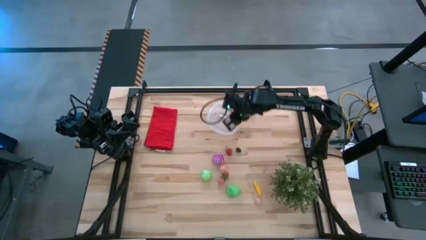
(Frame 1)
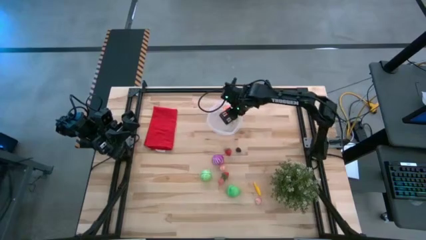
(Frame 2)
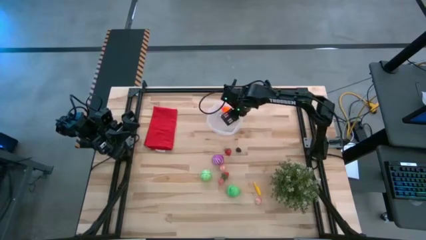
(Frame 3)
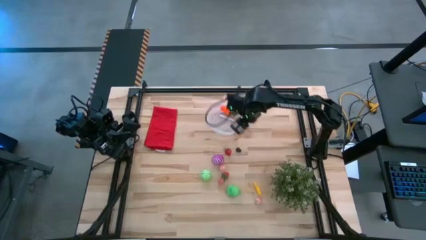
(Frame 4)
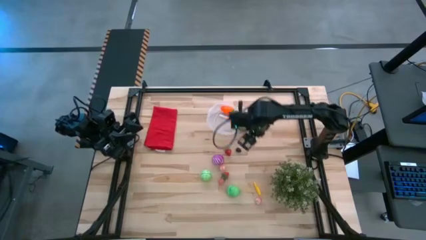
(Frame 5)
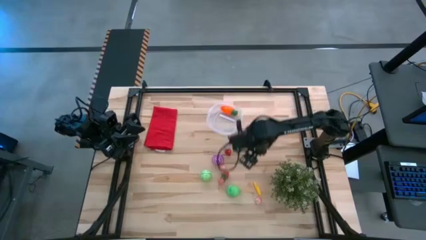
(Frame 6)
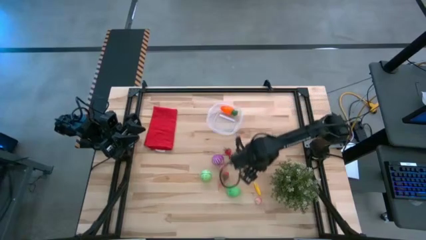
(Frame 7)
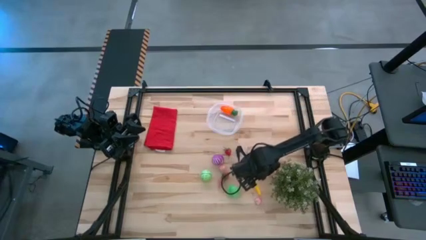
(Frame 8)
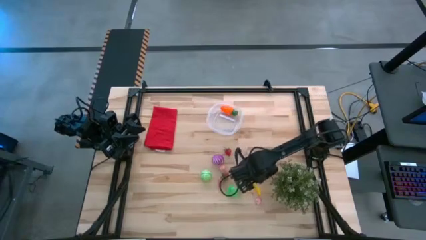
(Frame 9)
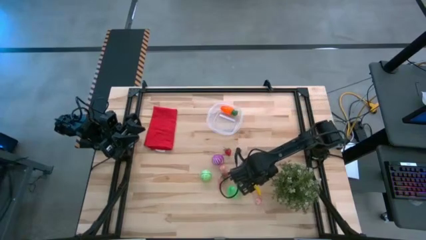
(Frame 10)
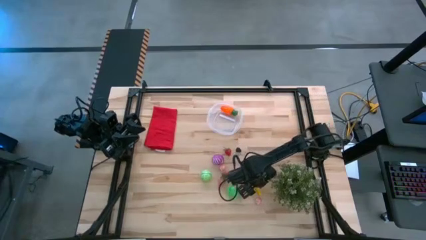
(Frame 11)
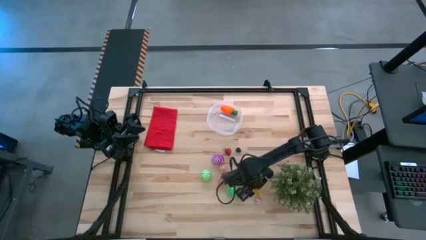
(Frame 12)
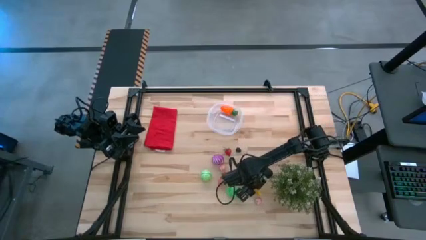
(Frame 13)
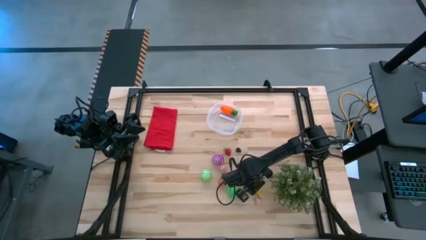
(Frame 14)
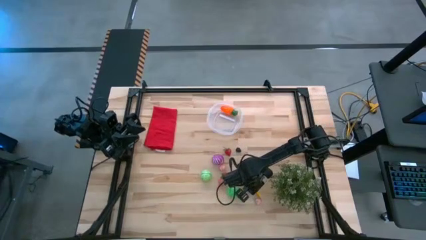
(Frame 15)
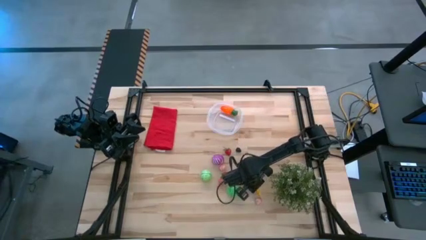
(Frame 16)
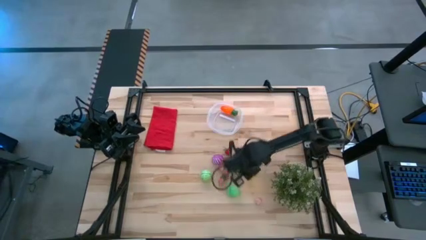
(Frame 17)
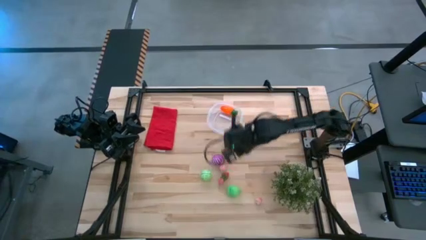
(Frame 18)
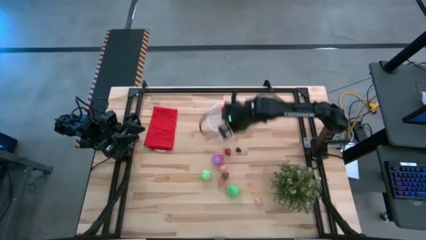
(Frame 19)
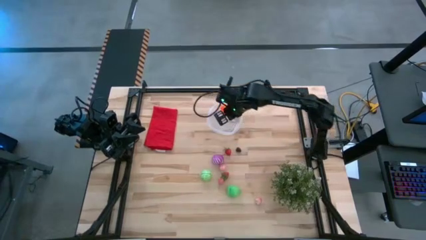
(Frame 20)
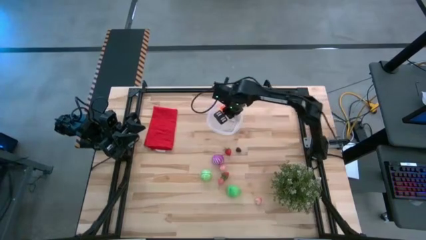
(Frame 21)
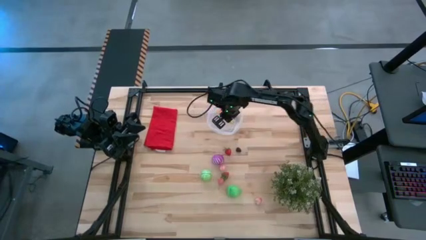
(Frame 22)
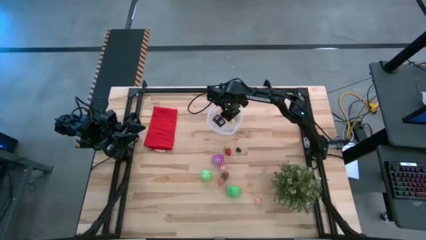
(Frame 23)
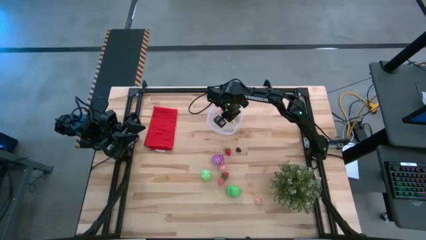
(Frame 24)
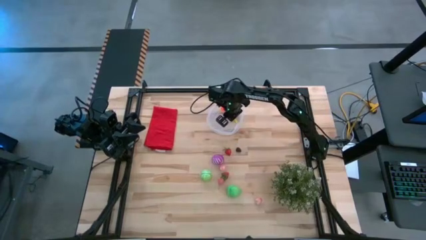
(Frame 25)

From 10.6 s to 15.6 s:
Task: Pick and placing Produce into tupperware
Put the yellow corn into the transparent bin

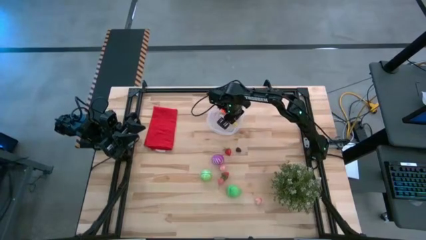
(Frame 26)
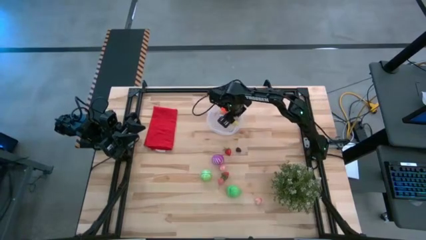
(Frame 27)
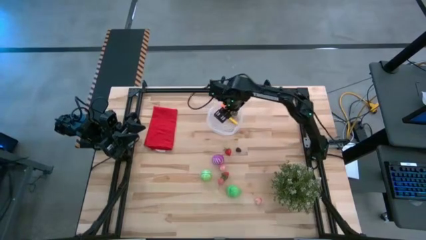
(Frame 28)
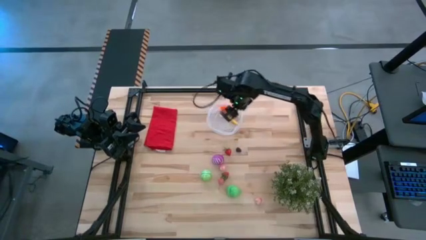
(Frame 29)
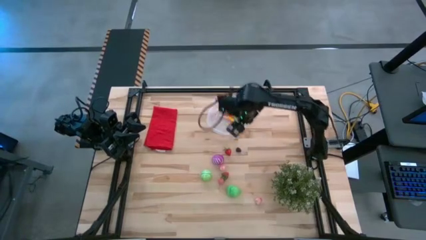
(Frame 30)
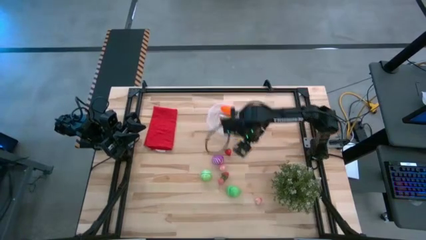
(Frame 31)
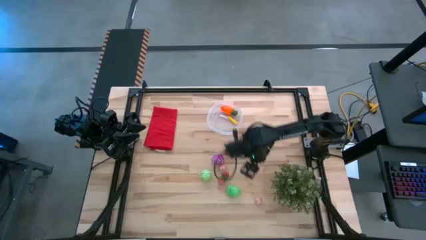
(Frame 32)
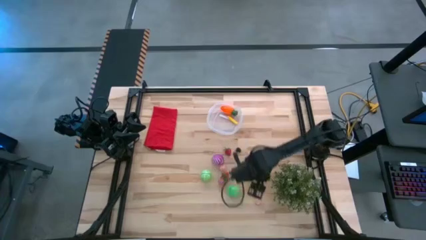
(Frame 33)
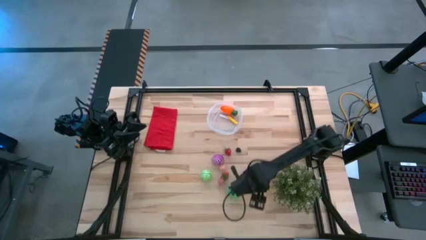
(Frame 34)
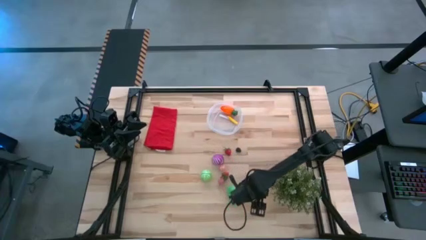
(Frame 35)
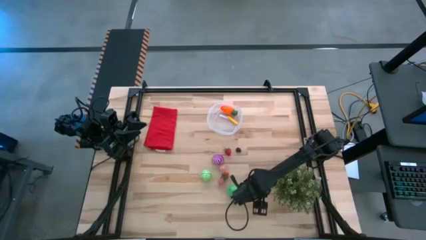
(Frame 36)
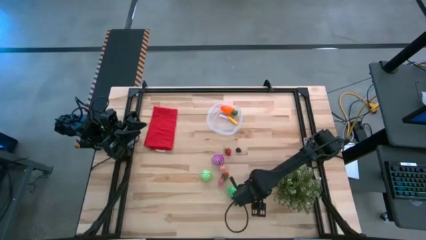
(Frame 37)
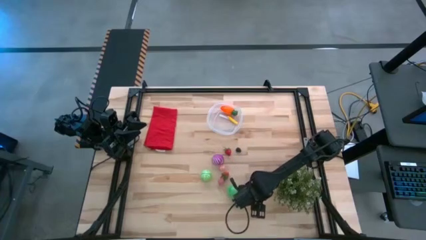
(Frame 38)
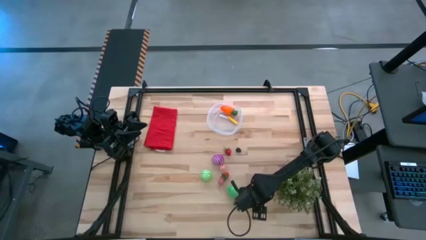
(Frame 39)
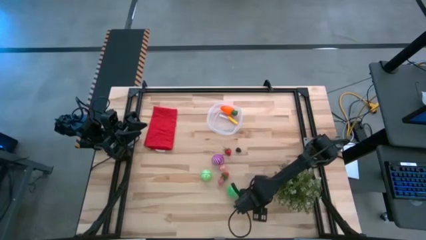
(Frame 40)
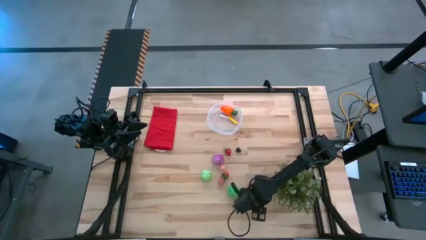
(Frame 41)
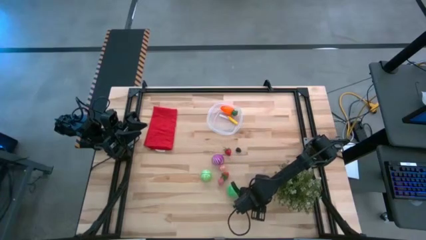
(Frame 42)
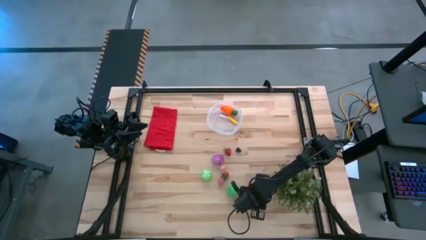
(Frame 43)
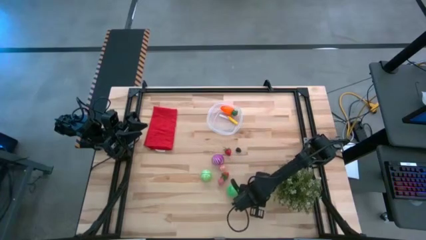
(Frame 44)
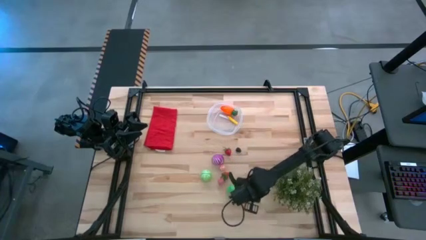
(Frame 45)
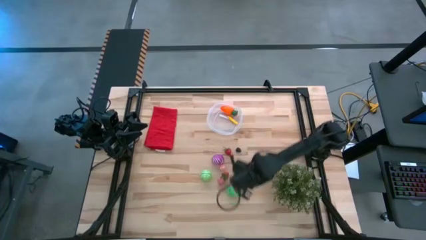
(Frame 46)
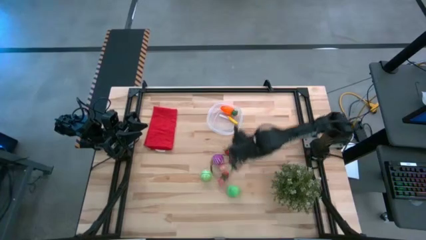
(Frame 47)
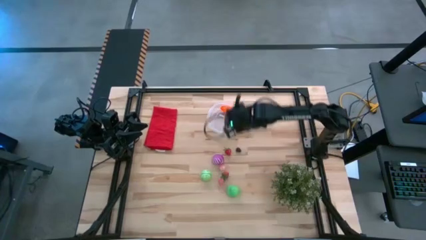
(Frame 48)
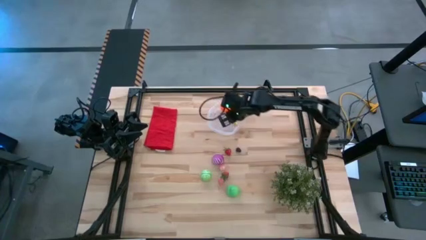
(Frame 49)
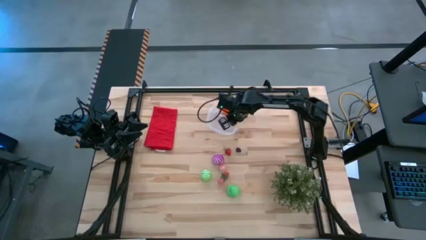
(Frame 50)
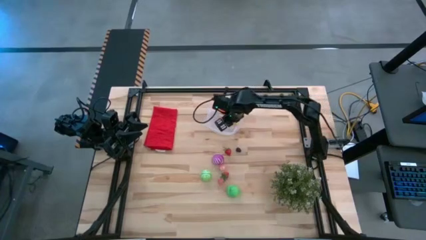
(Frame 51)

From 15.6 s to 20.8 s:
Put the bottom pink peach into the transparent bin

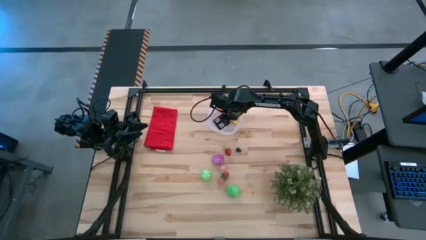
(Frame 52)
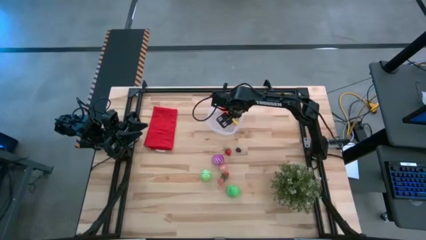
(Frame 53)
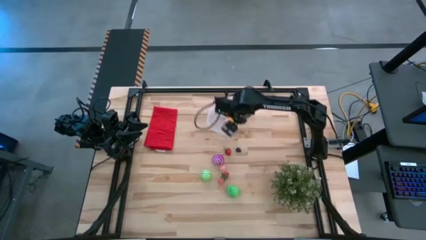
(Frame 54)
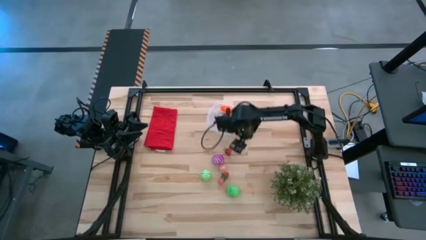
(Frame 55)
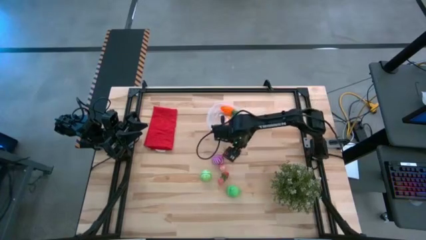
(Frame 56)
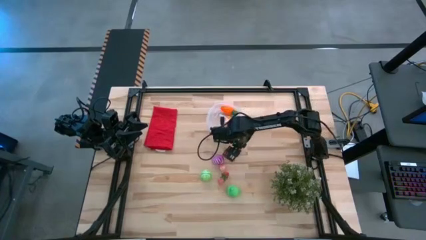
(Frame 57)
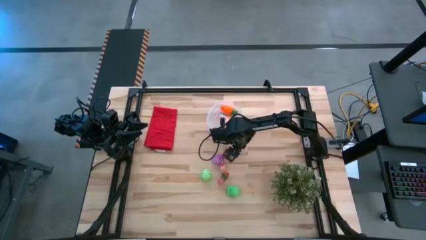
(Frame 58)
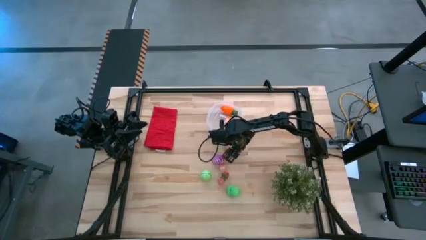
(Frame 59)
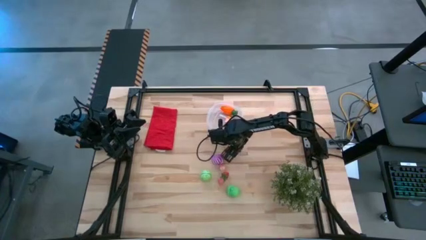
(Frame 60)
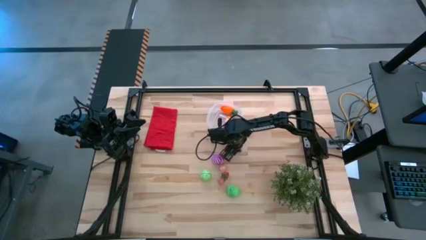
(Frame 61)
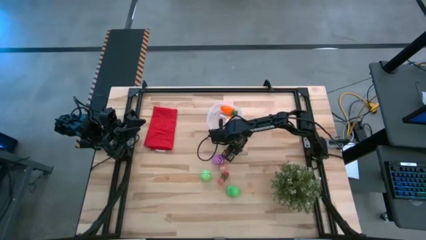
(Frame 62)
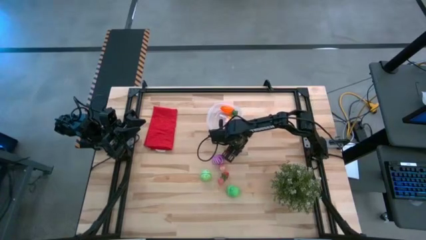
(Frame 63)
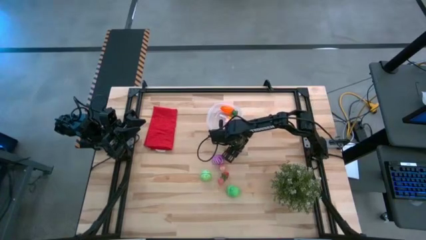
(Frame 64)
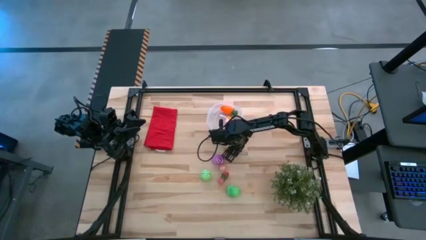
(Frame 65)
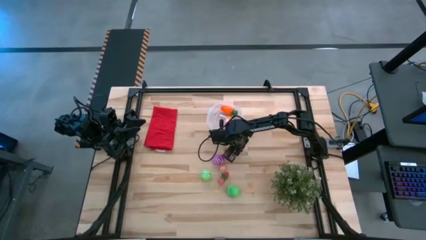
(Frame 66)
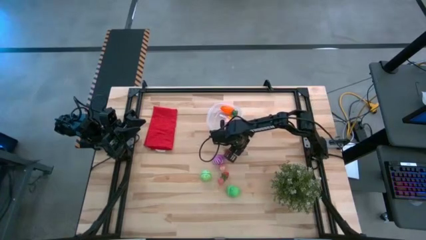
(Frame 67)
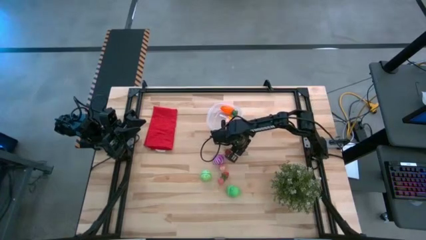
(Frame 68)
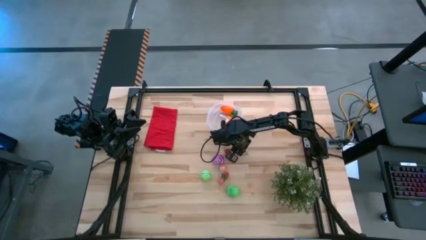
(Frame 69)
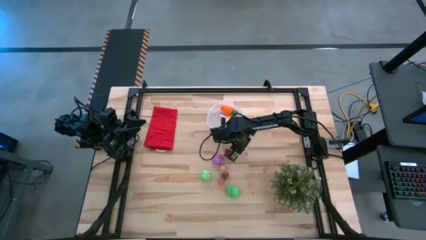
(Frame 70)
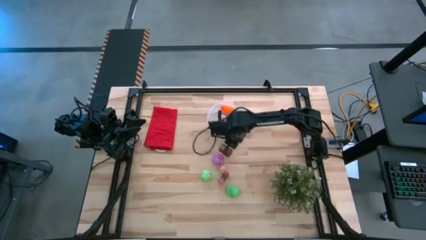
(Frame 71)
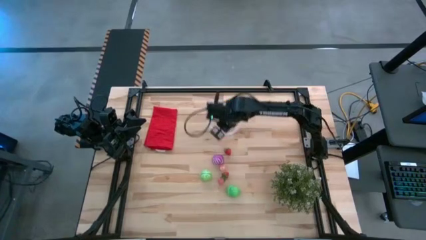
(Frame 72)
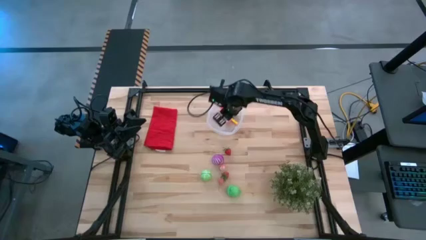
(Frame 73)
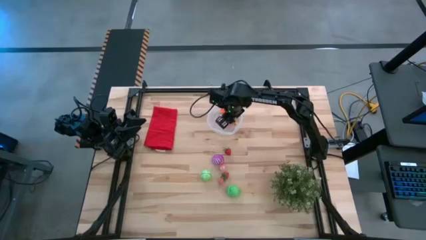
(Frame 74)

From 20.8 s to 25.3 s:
Put the blackberry into the transparent bin

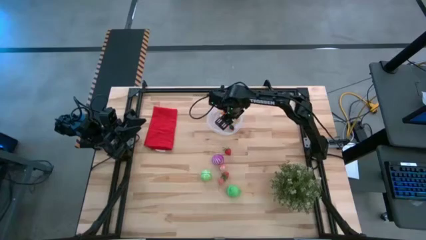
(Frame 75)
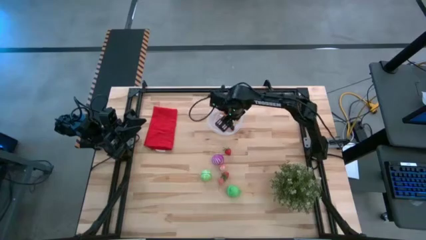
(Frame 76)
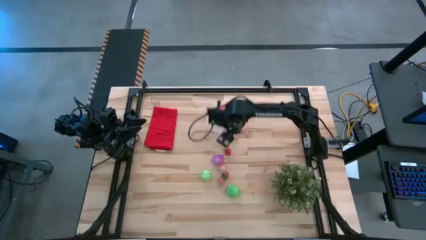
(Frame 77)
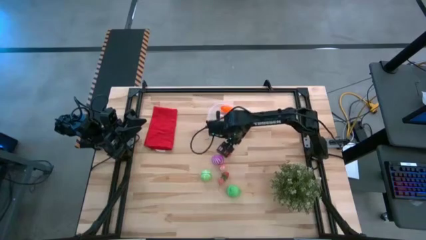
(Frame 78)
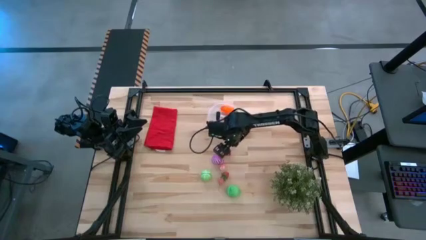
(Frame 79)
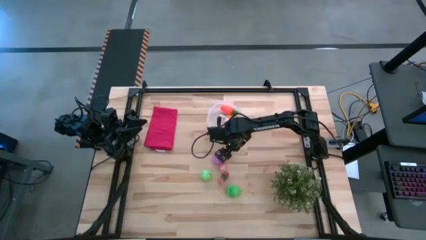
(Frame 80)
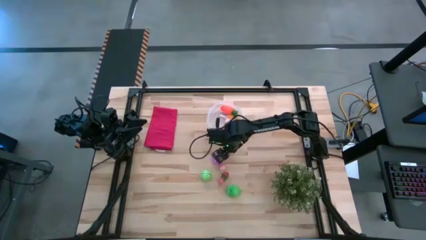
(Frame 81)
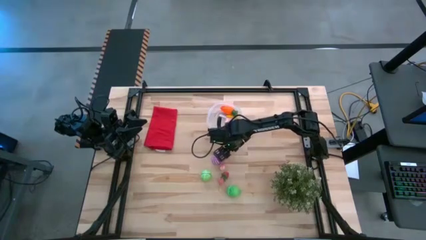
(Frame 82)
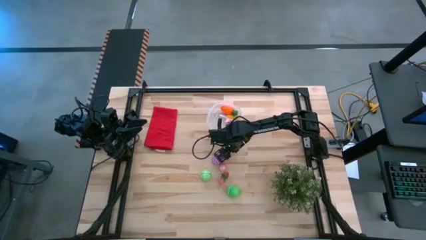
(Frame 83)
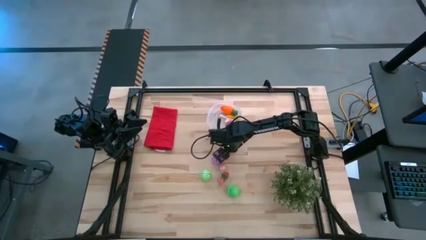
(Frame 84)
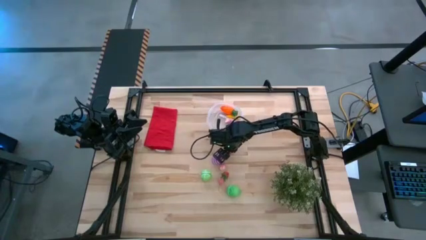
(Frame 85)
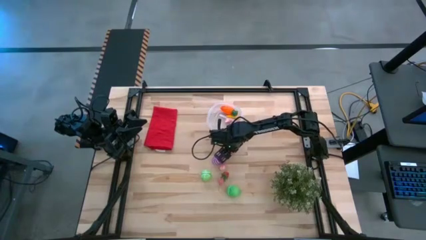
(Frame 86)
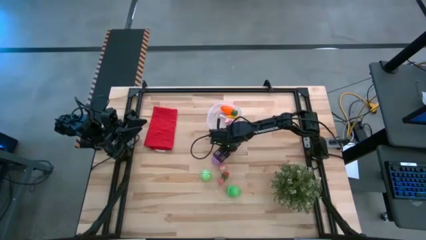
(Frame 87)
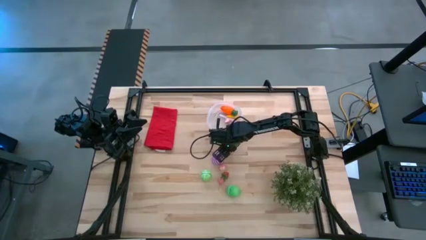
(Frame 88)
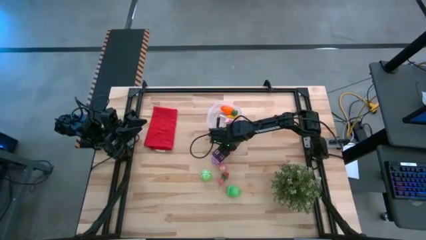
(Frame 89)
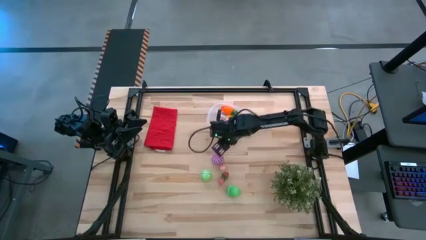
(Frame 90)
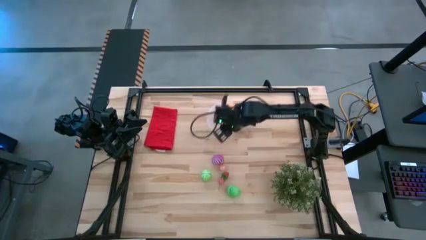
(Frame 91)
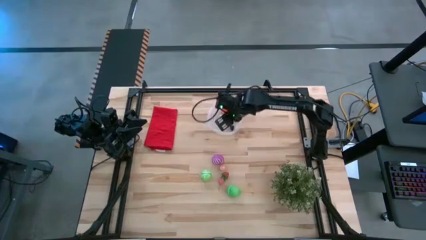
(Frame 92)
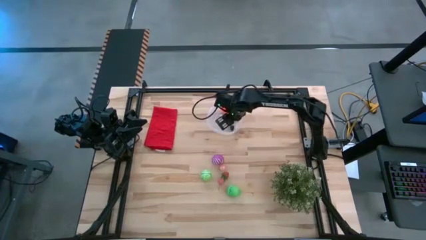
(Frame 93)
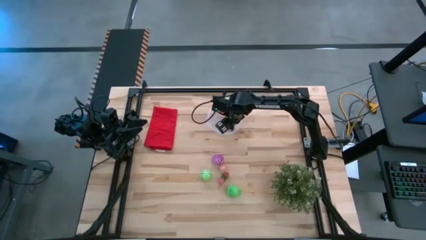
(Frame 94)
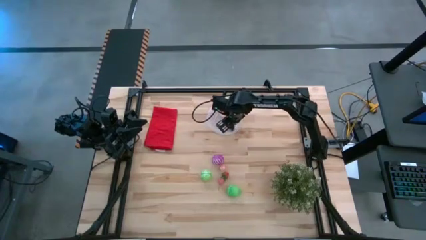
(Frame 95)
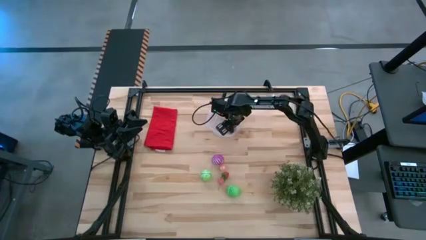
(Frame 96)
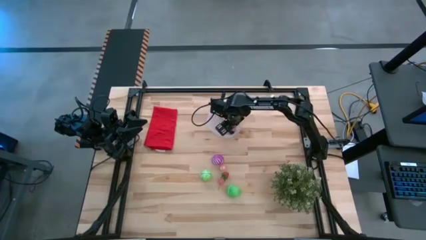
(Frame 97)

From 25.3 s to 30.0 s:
Put the top red strawberry into the transparent bin
